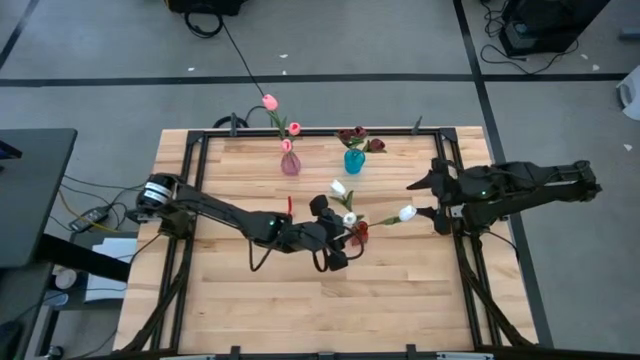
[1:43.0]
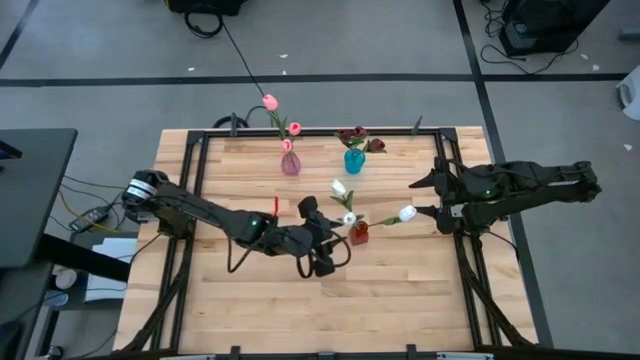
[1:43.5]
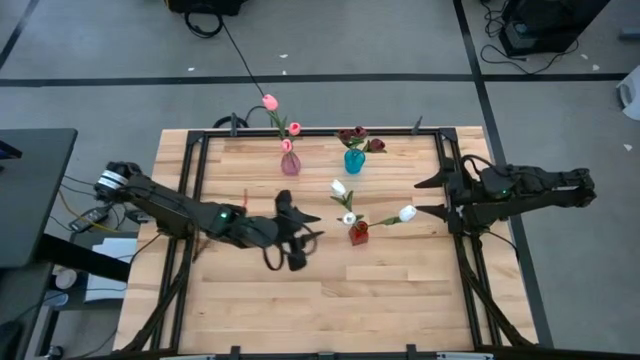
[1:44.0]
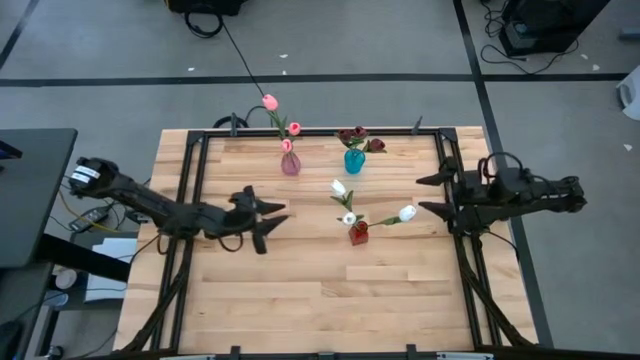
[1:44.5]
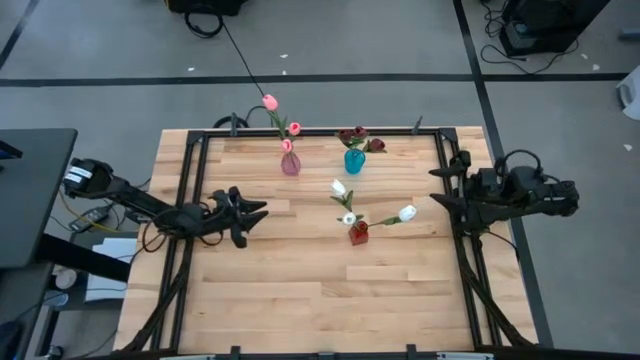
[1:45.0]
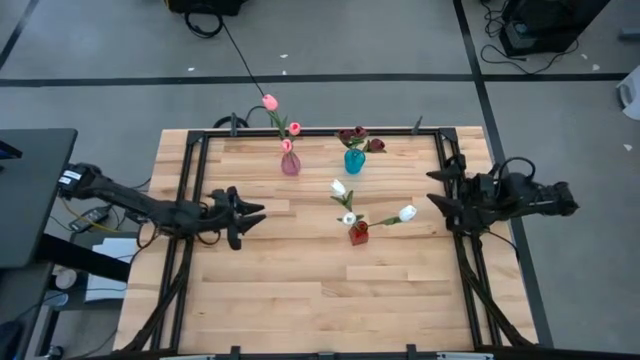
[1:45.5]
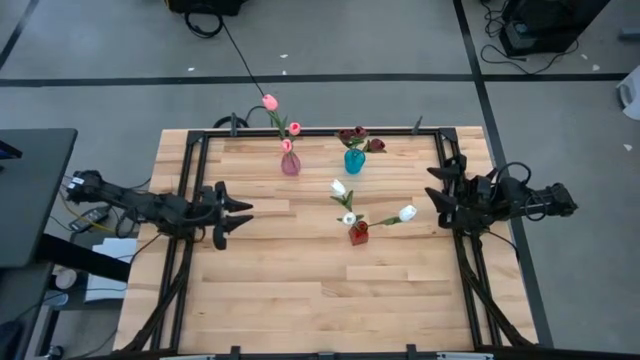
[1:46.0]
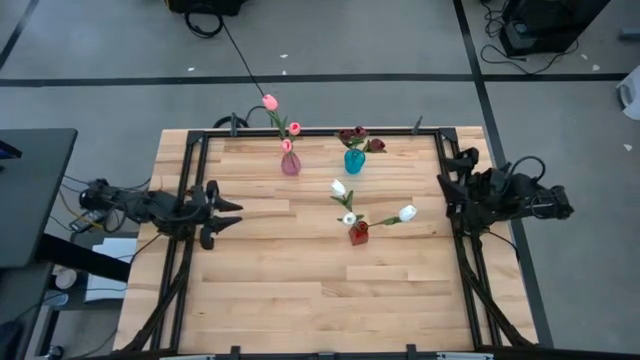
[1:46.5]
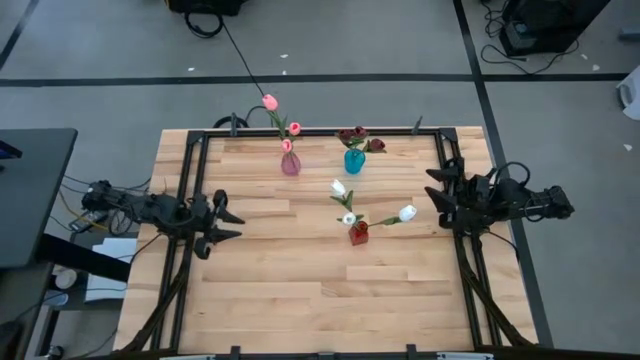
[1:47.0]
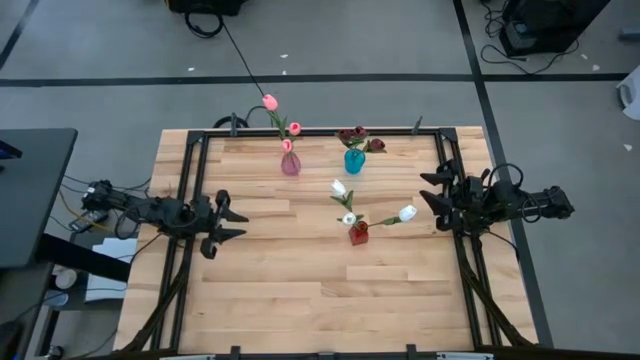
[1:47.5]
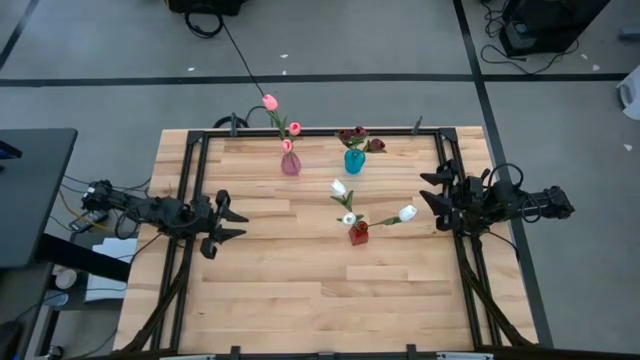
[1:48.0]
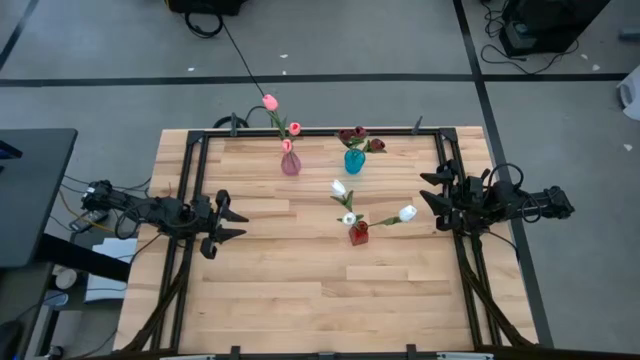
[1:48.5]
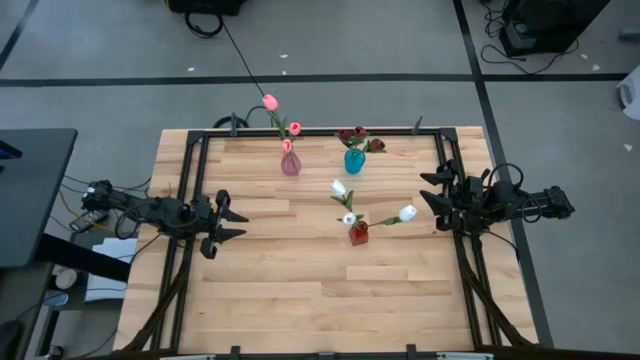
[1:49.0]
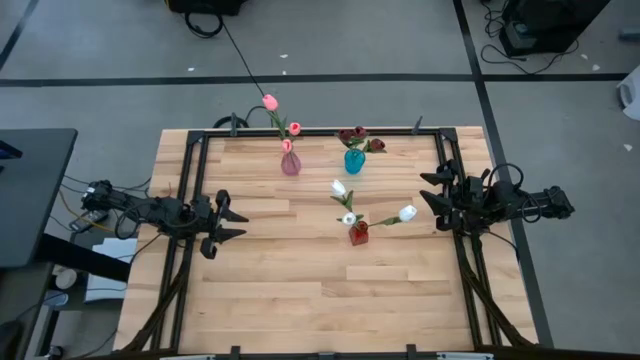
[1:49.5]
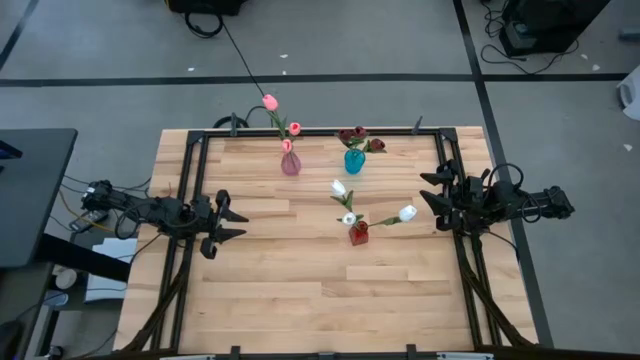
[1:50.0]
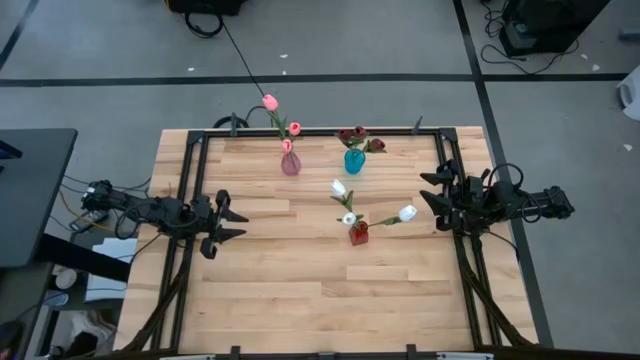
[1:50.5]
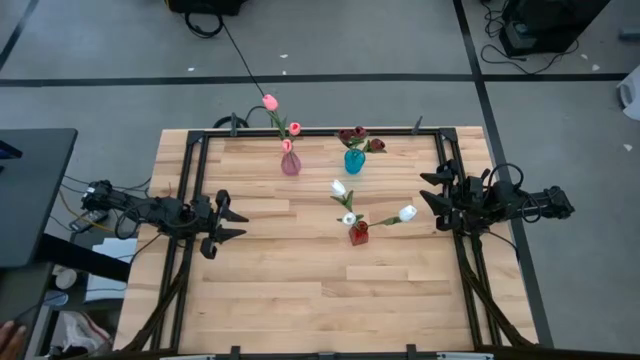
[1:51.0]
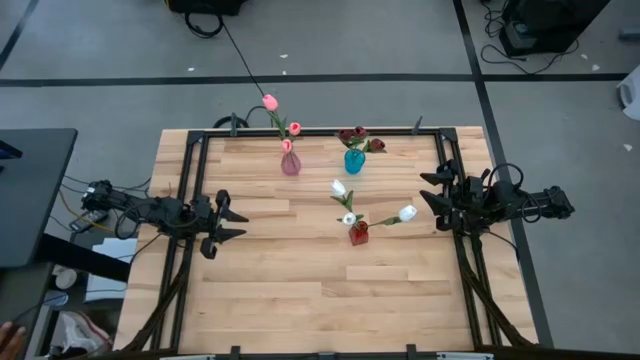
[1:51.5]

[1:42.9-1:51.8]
Task: Sort flowers into vase by color
Return to Home Position

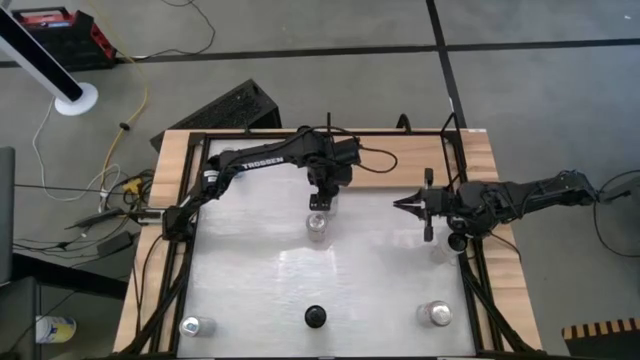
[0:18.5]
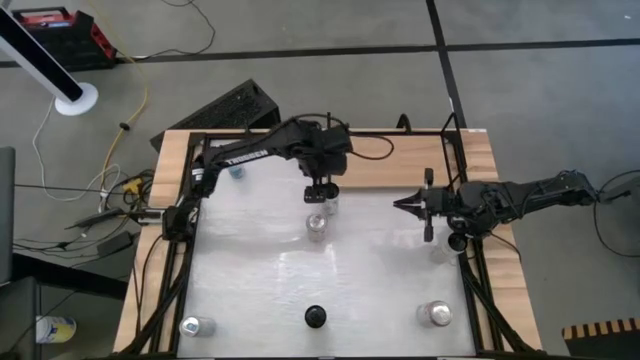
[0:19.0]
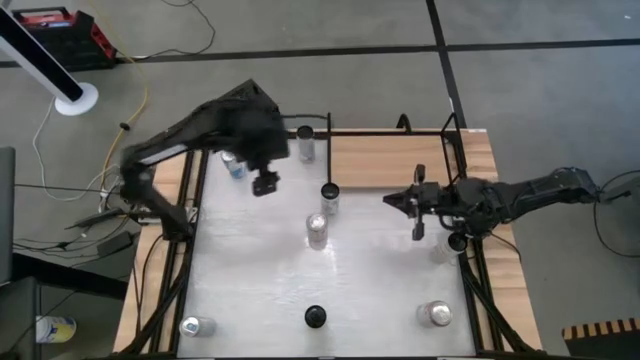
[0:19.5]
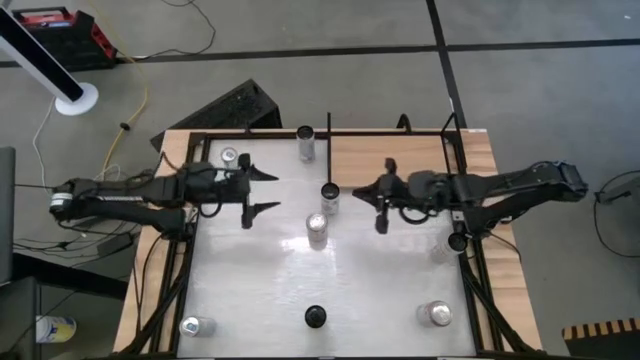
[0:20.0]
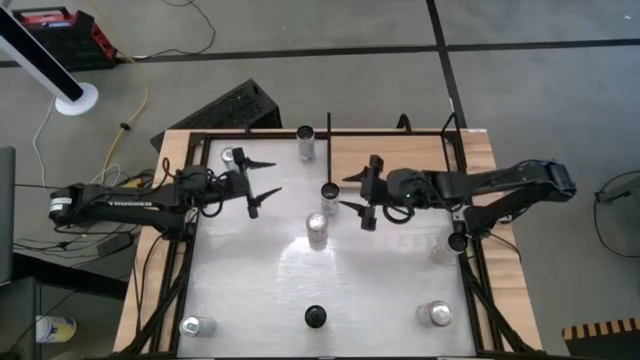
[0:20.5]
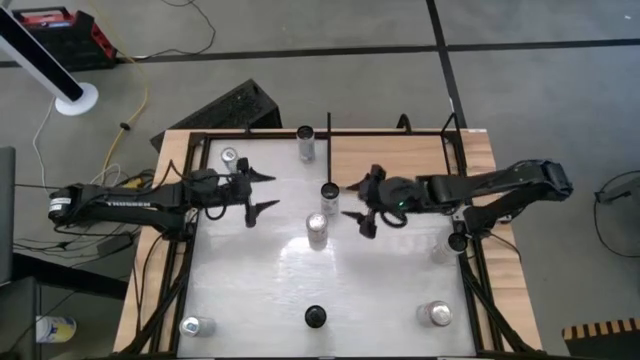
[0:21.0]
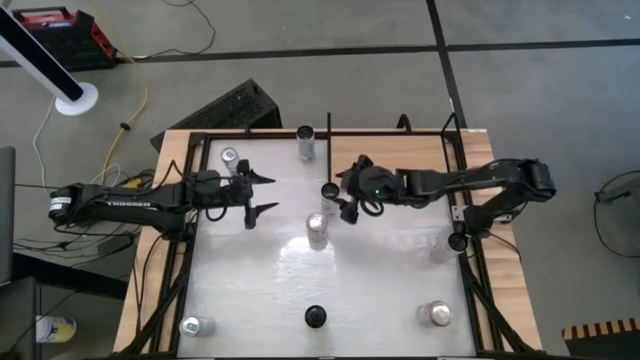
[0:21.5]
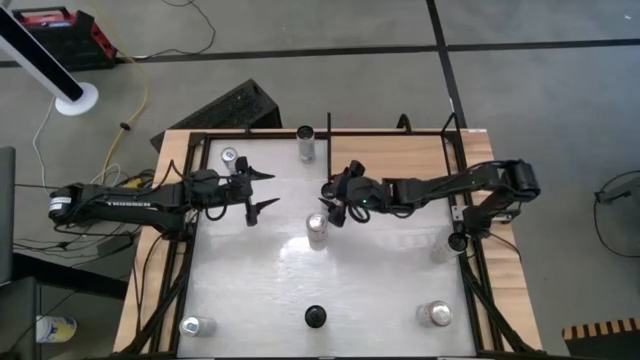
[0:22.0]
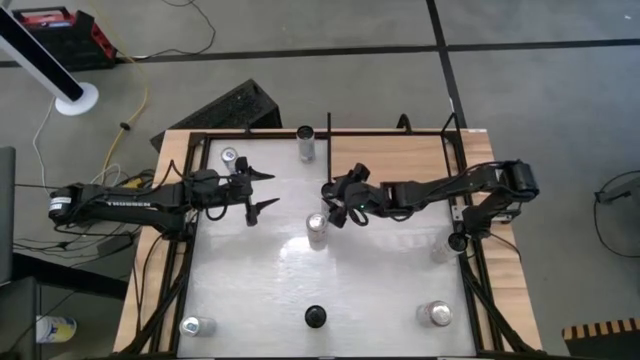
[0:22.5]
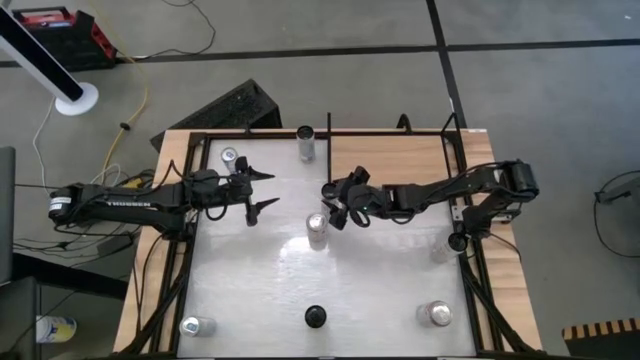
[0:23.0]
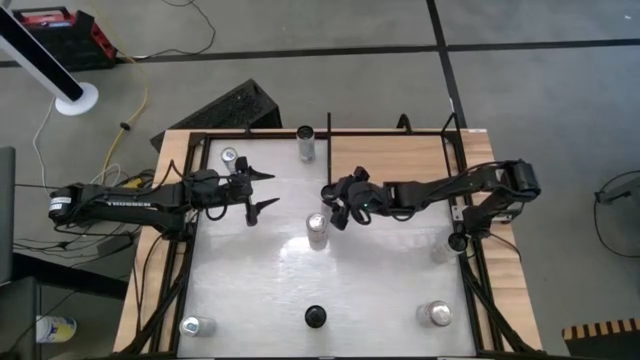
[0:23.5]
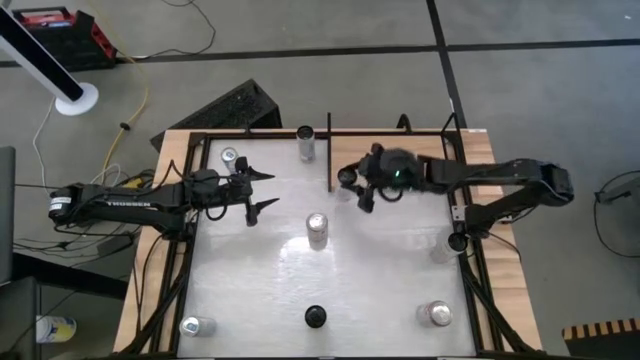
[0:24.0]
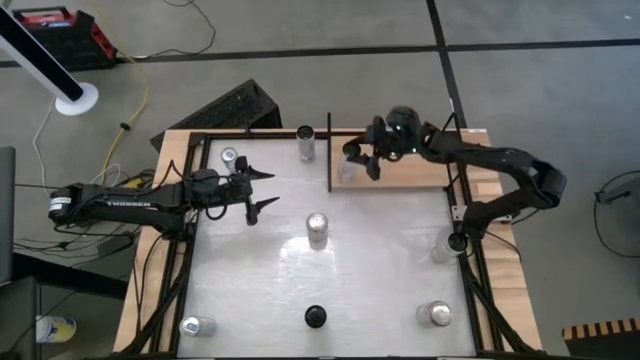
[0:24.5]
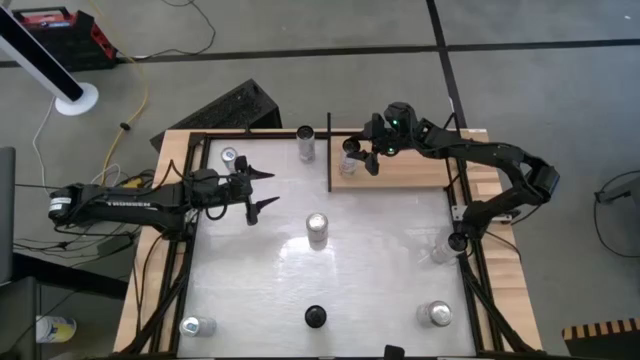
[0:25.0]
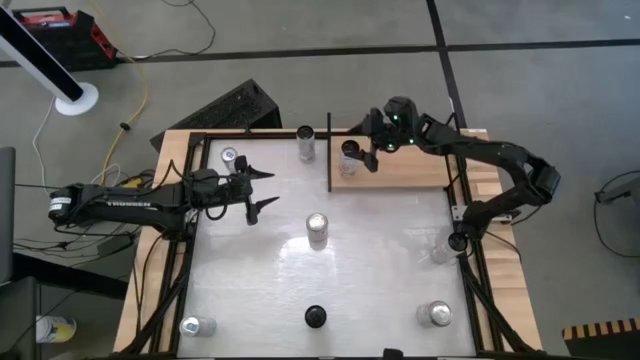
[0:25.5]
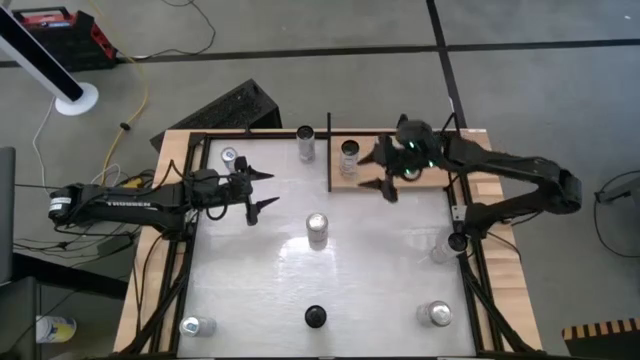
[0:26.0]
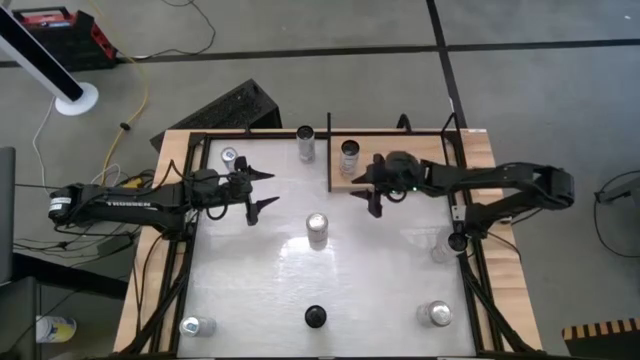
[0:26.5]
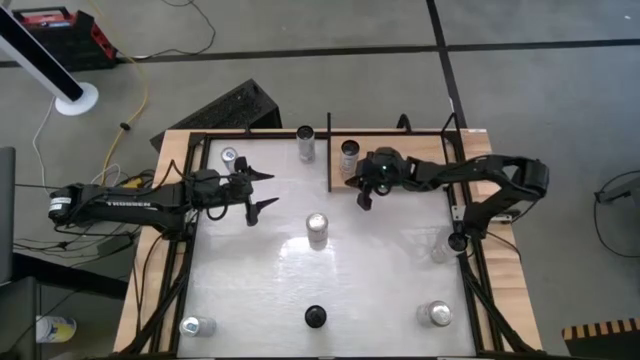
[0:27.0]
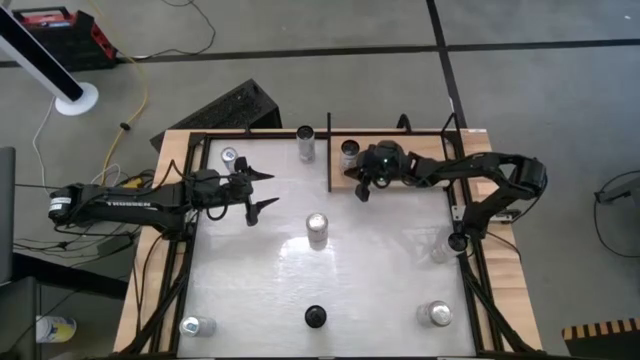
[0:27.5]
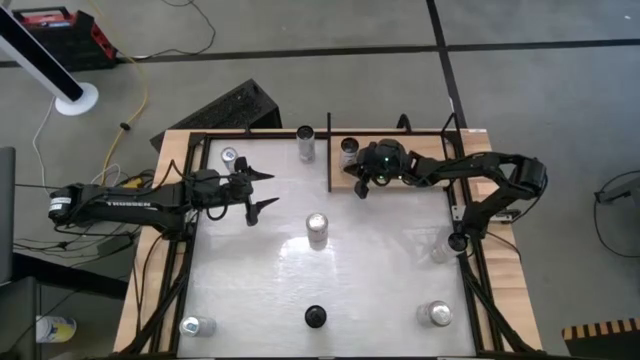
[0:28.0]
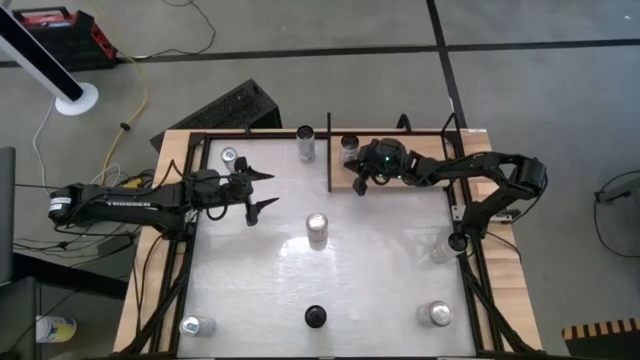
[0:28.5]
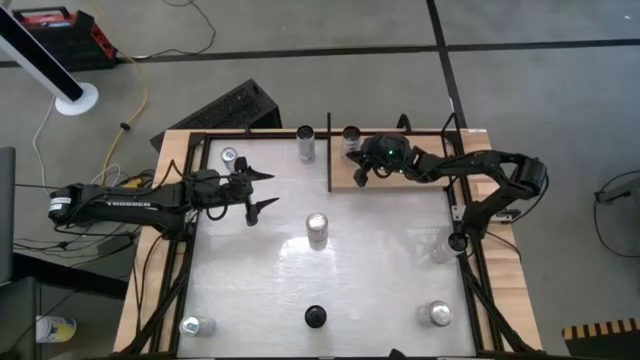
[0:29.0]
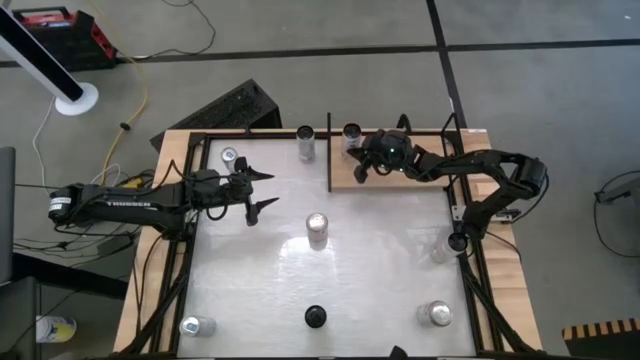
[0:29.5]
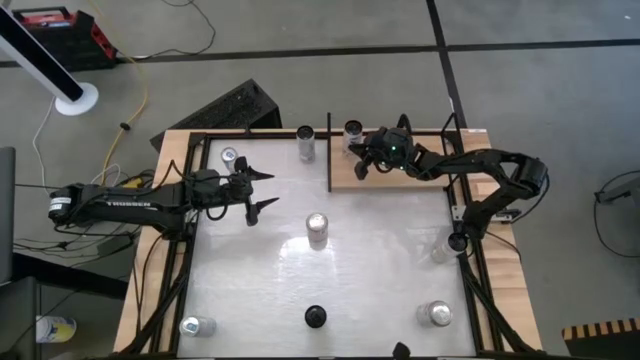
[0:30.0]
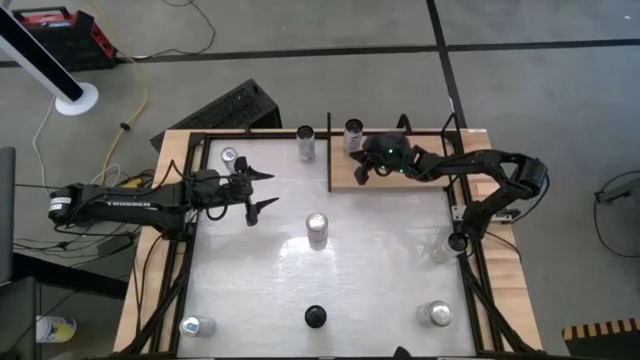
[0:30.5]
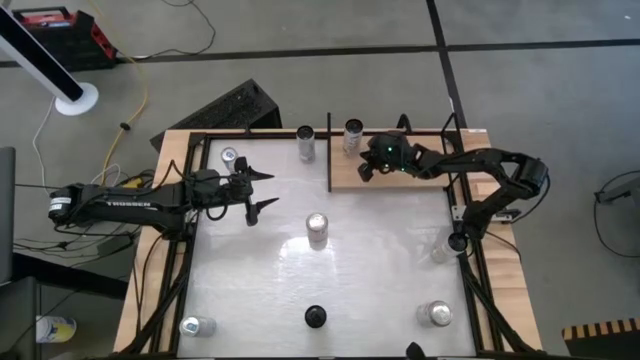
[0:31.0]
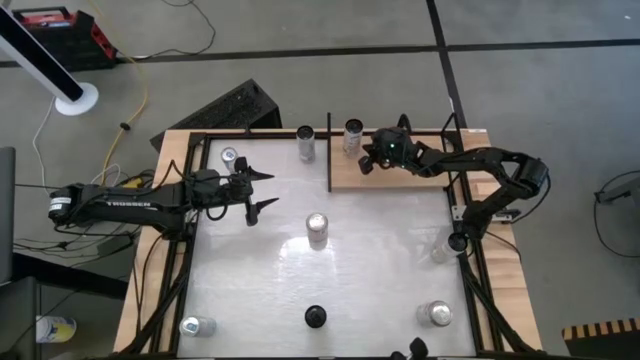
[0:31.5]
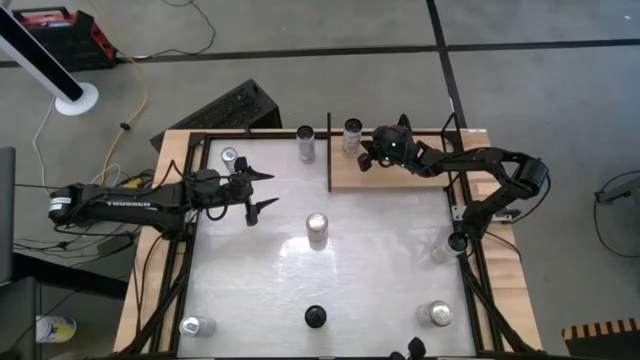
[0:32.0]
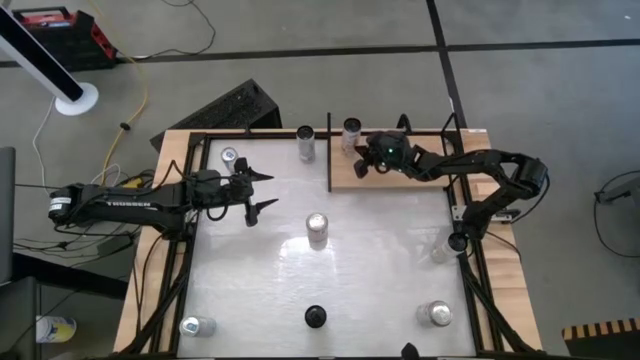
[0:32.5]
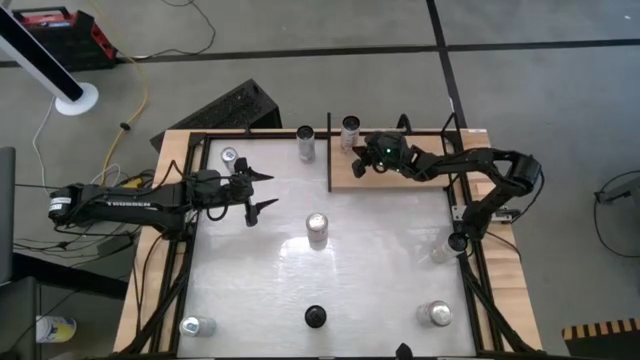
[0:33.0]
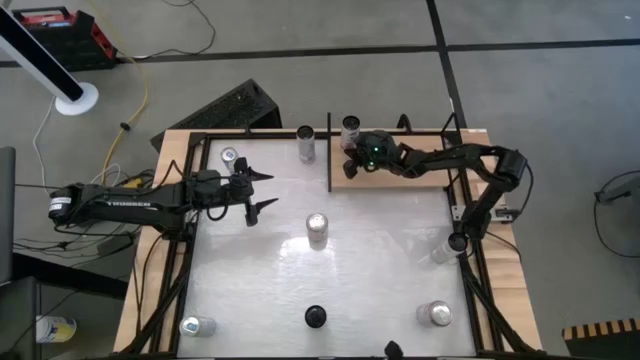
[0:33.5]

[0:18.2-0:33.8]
Task: Place canned beverage on shelf
Put the top white and pink soda can on the shelf
